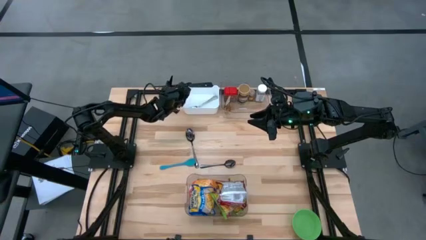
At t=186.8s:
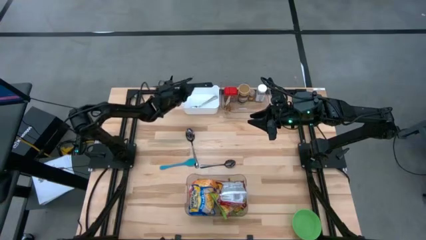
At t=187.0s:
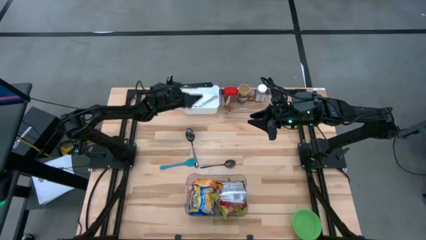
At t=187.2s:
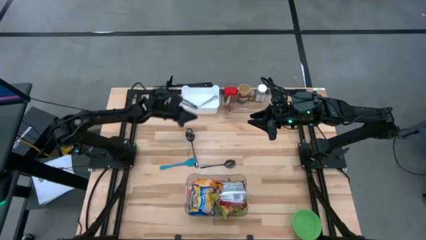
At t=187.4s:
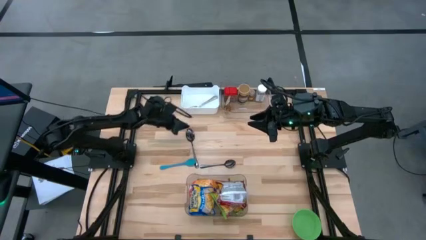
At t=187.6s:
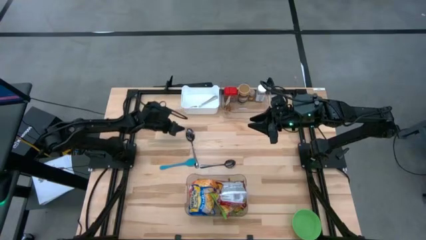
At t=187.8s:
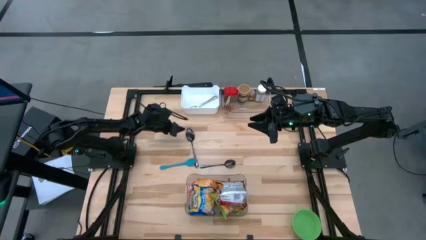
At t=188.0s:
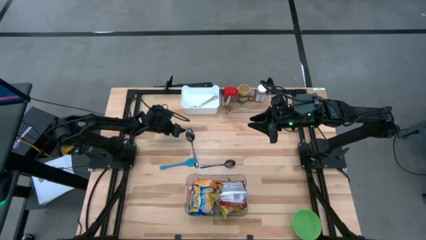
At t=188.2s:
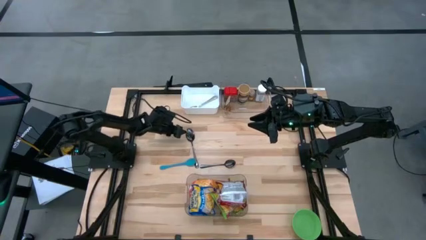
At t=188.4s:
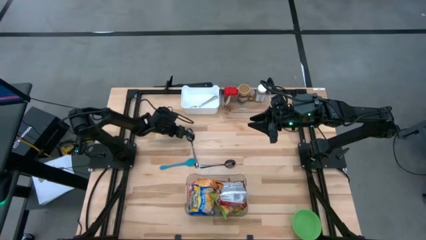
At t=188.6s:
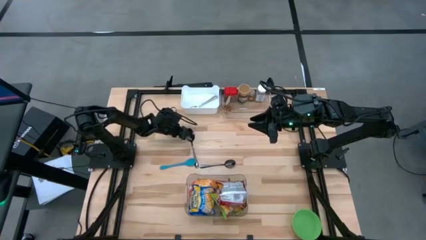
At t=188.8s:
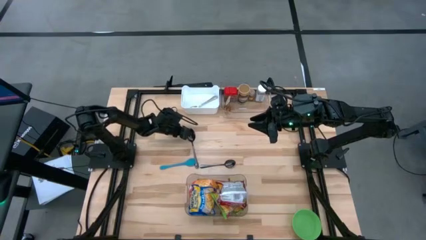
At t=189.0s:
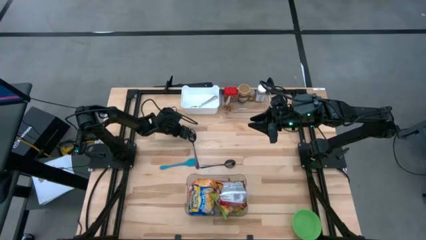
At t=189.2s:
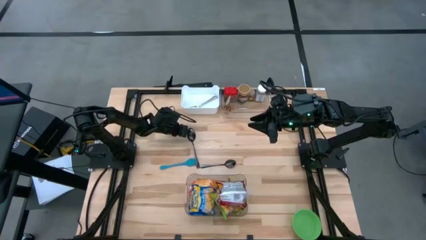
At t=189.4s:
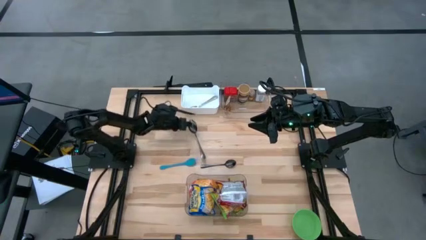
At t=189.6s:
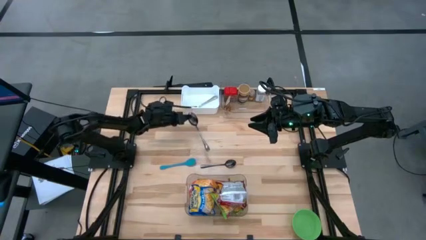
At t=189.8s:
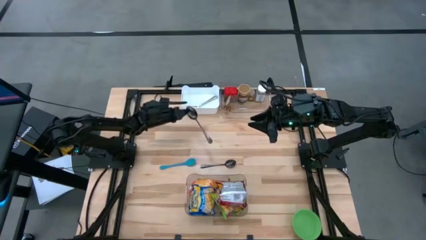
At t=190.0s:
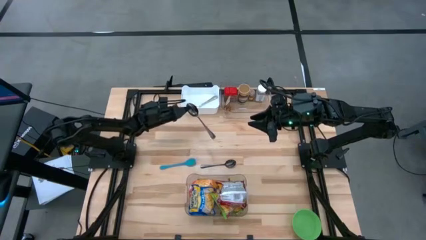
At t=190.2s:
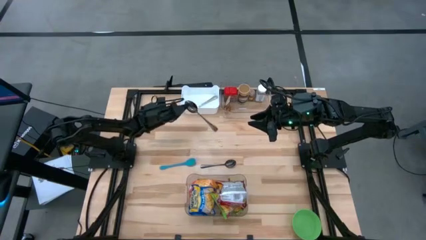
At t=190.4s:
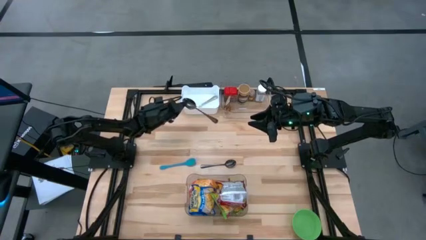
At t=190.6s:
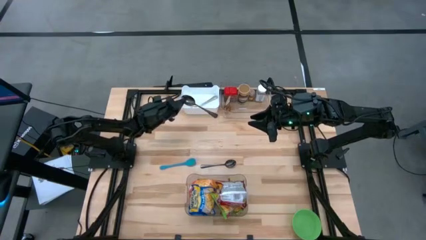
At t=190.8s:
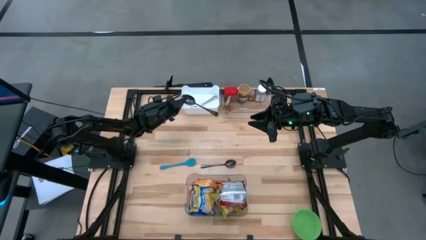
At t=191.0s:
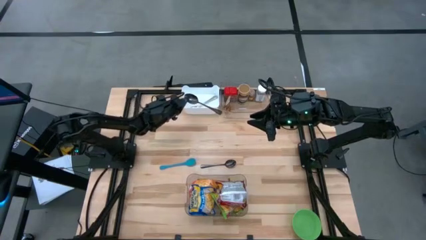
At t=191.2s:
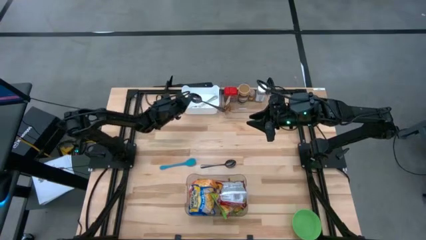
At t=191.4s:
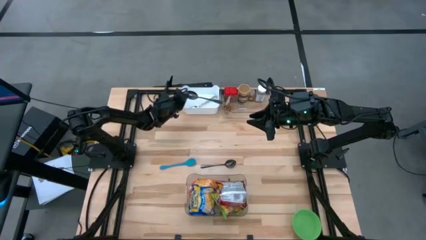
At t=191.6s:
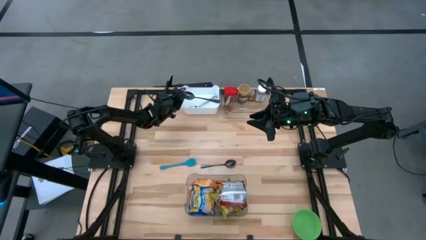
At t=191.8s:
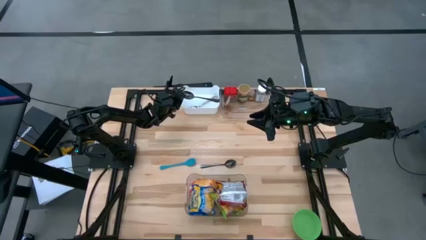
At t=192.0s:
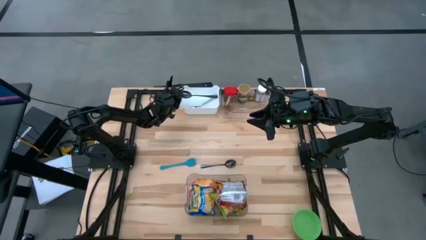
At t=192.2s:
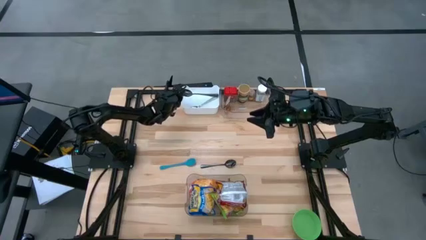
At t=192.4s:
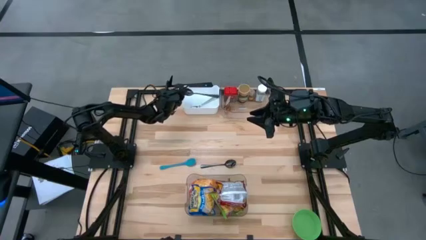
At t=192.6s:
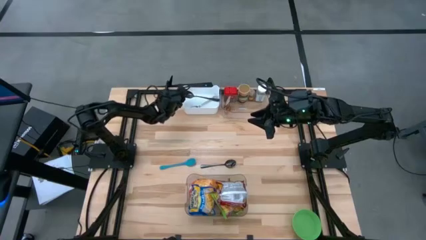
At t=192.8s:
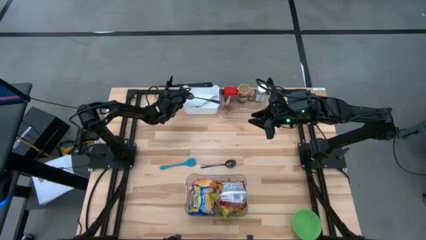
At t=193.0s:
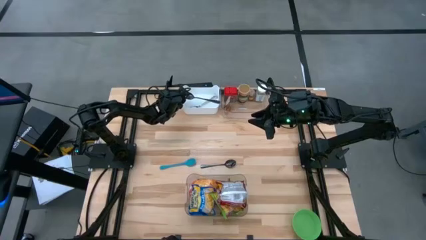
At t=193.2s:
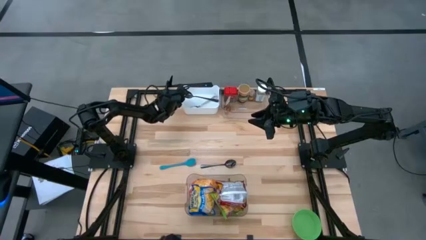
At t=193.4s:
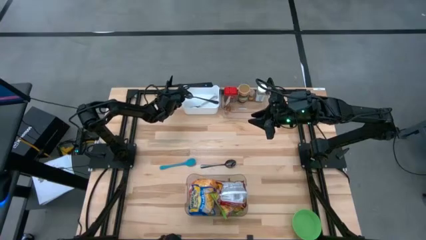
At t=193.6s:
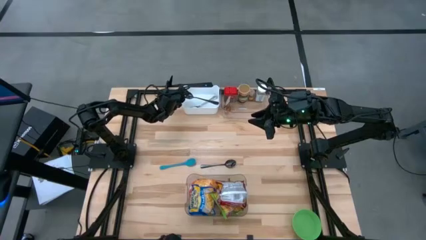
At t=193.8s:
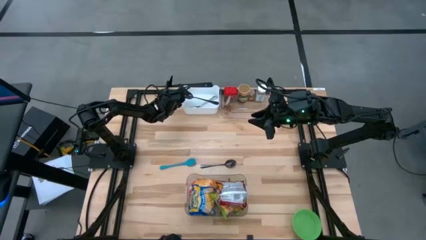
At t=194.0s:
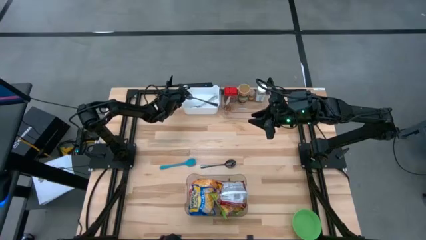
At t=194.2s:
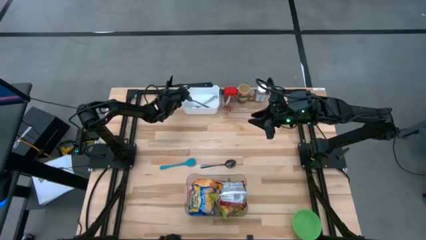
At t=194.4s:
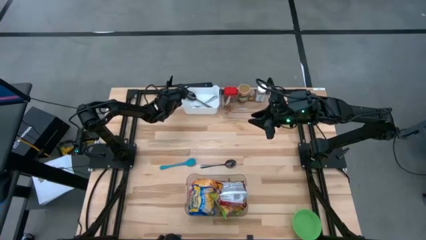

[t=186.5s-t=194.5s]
Task: Pick & Place Food Item
Put the top black spoon into the white bin

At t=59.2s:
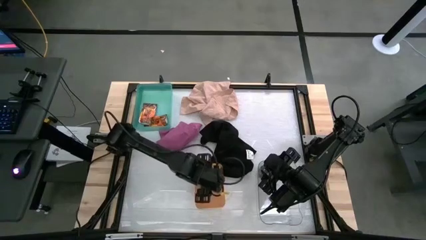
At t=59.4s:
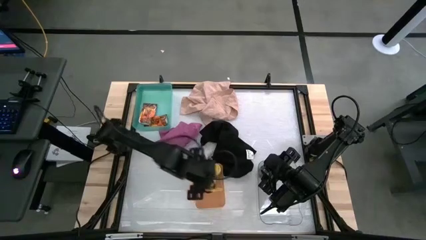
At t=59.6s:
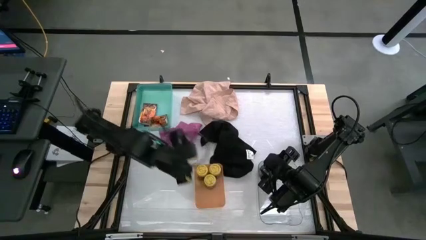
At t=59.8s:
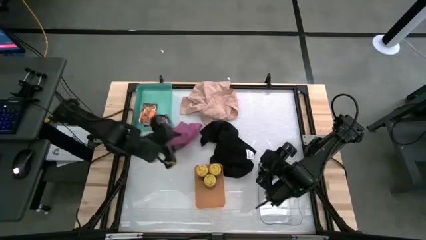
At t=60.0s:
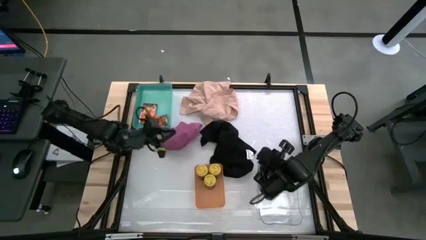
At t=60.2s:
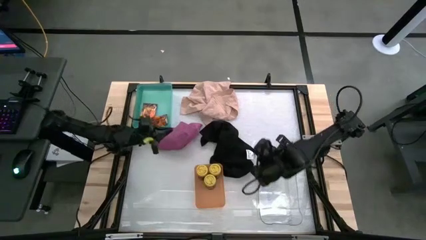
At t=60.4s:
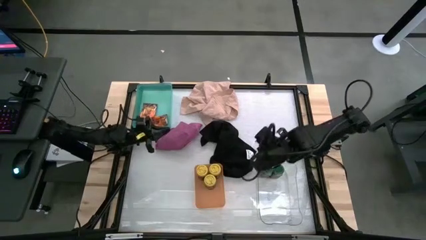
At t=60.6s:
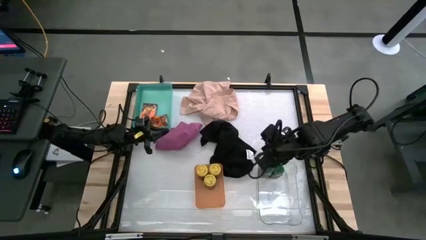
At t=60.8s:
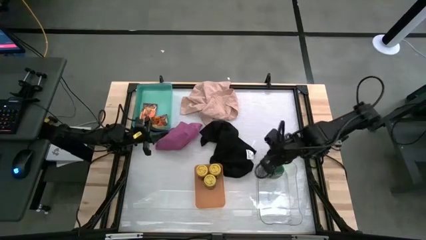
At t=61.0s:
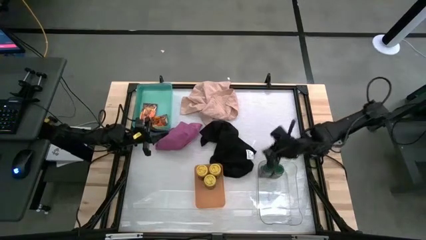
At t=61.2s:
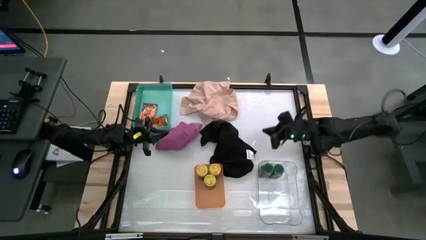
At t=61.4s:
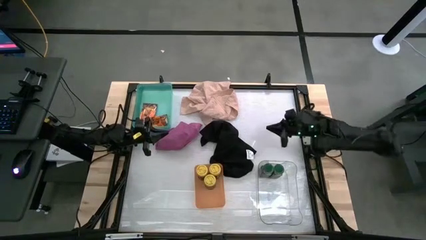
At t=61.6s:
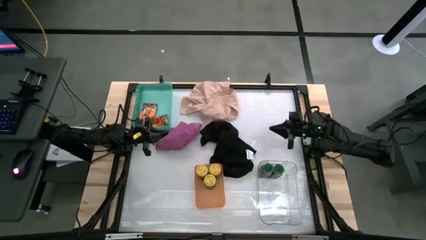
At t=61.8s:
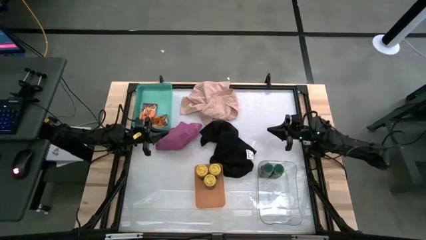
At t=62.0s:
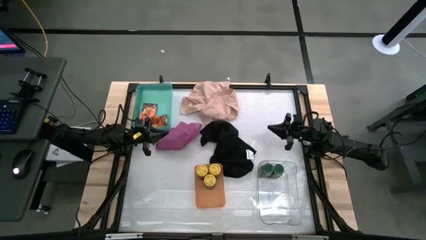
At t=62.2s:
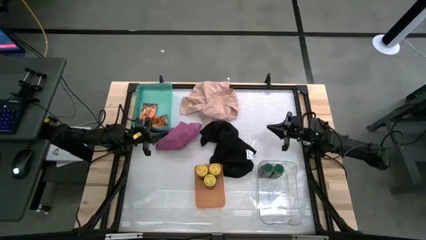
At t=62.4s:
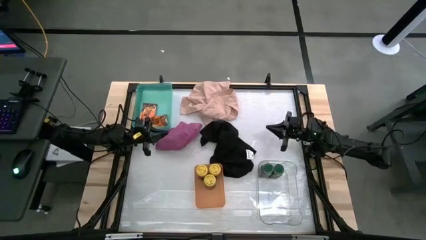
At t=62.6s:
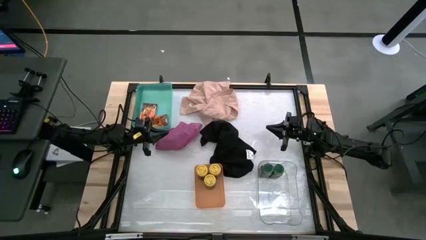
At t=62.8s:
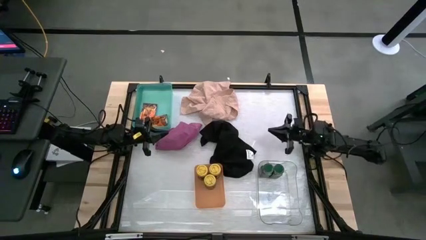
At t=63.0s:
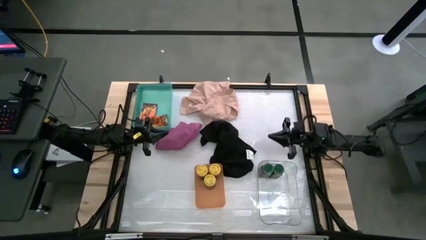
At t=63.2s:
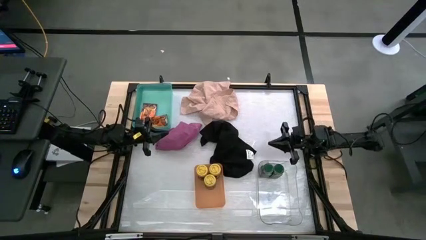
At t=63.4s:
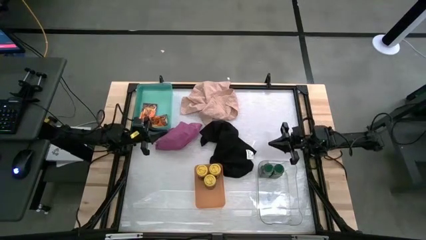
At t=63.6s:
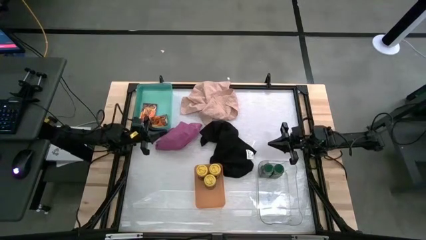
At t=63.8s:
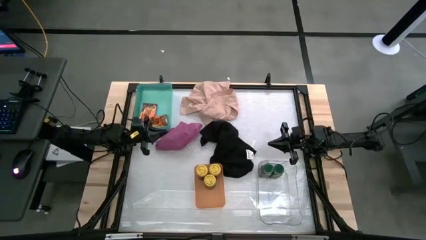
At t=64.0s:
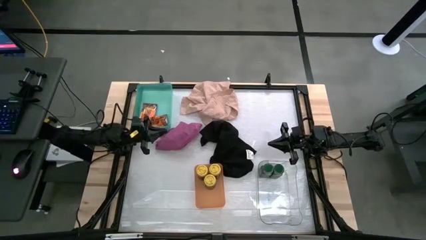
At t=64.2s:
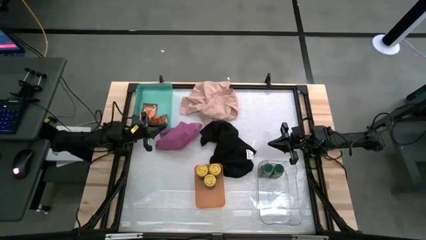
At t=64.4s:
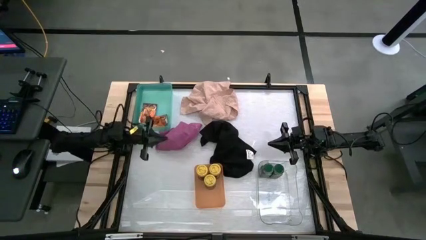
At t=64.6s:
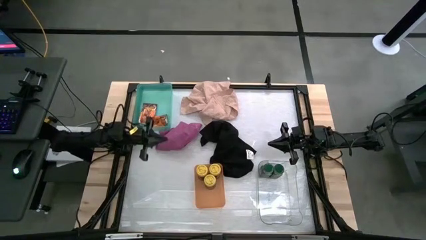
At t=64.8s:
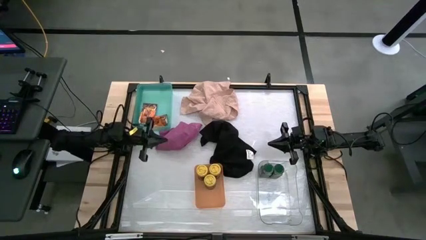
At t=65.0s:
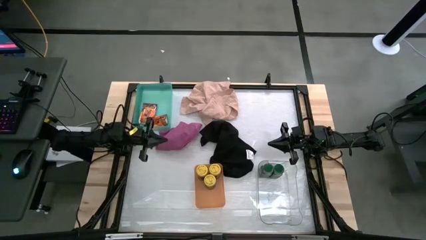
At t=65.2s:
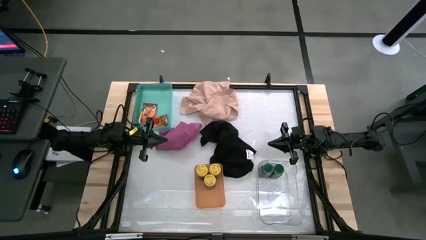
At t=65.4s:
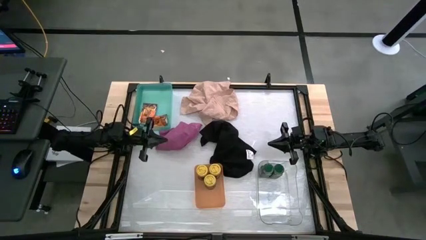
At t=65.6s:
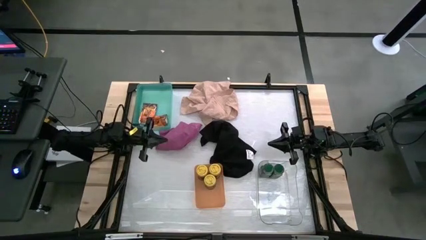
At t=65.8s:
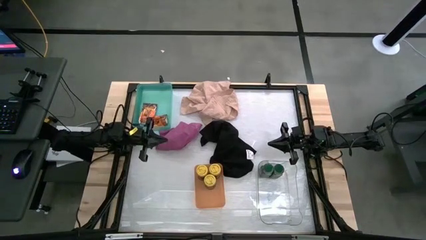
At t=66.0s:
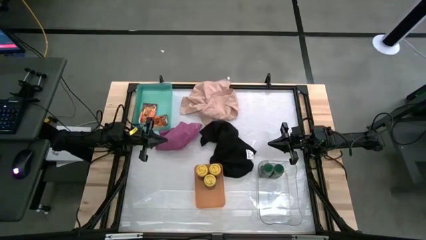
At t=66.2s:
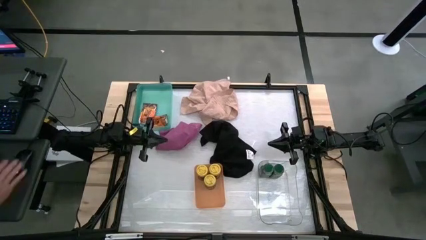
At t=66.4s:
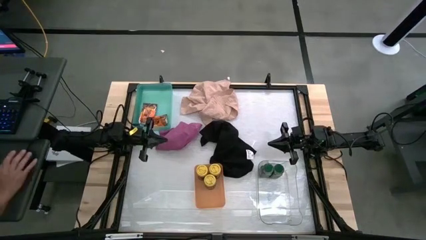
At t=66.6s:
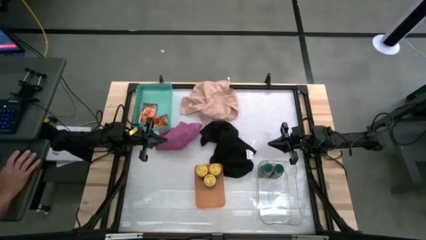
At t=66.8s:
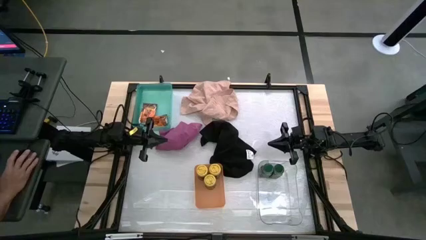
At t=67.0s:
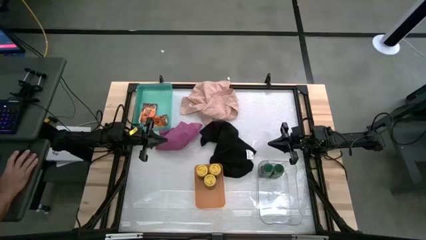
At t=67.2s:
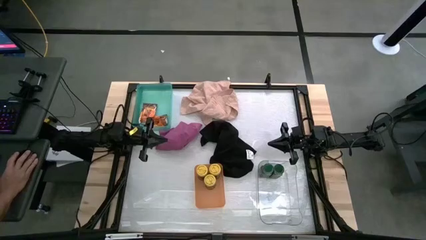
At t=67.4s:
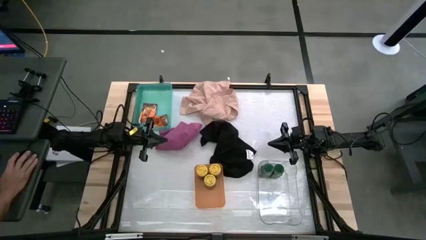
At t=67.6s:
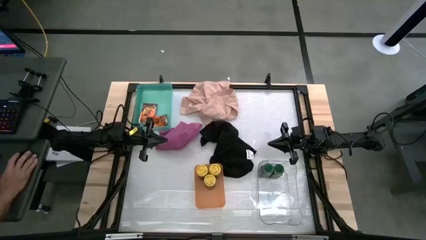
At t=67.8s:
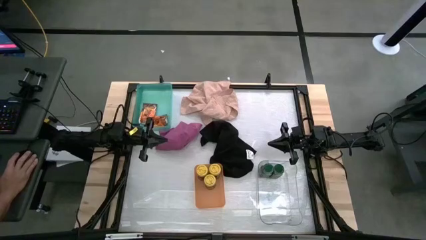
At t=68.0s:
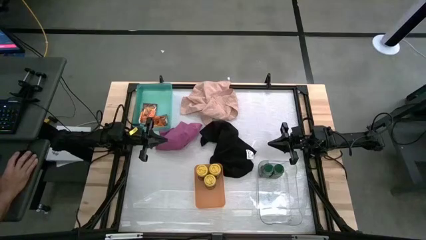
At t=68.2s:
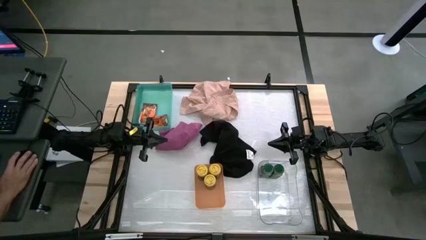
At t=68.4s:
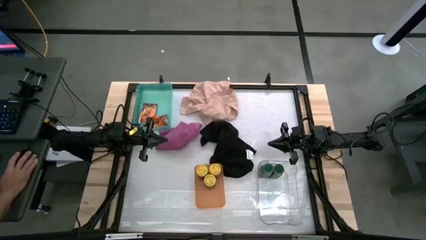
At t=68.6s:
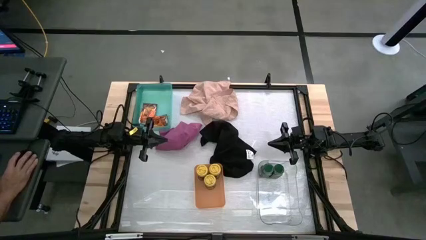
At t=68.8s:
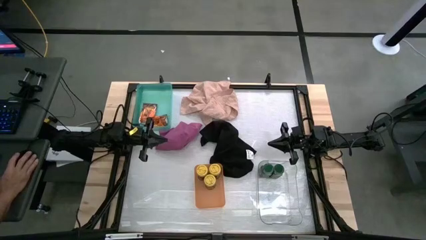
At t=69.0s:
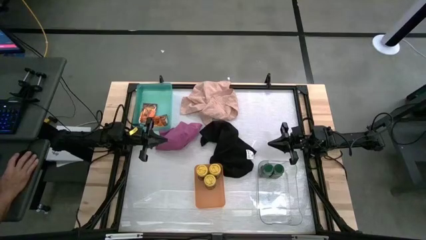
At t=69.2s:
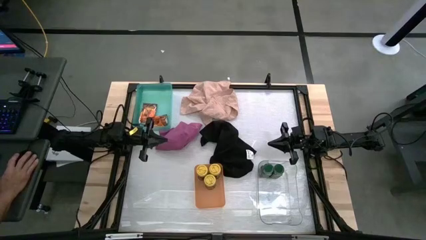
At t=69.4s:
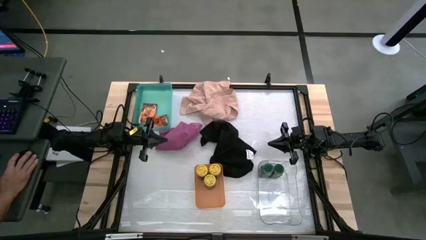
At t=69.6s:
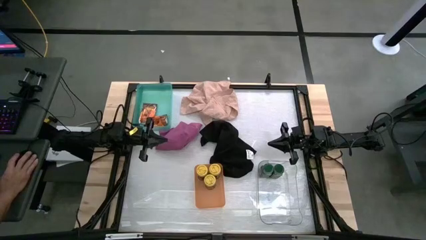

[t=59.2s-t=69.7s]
Task: Sort spices by type
Return to Home Position
